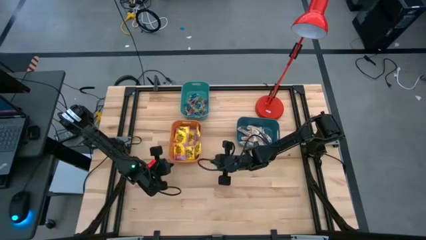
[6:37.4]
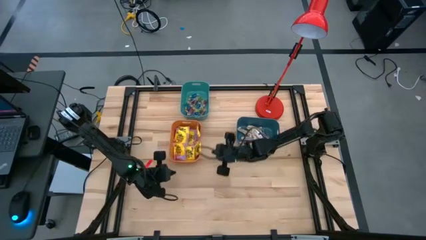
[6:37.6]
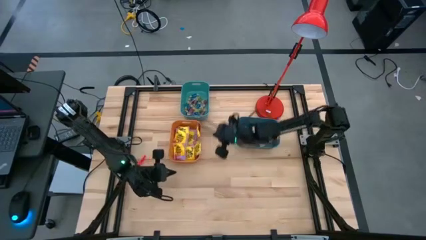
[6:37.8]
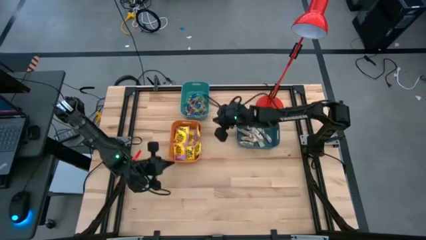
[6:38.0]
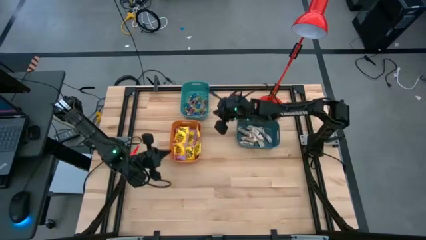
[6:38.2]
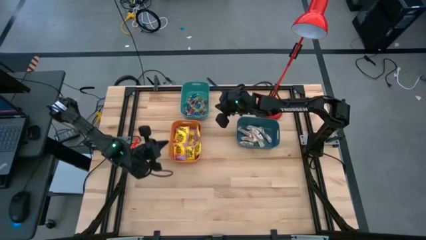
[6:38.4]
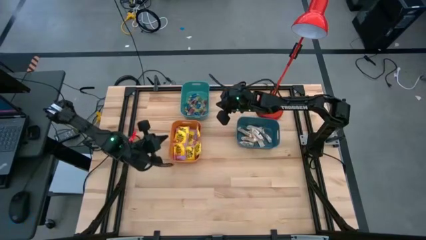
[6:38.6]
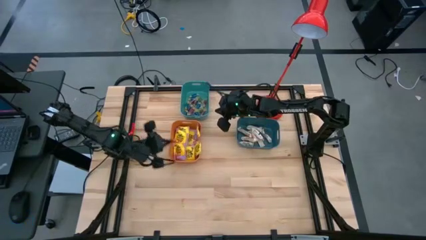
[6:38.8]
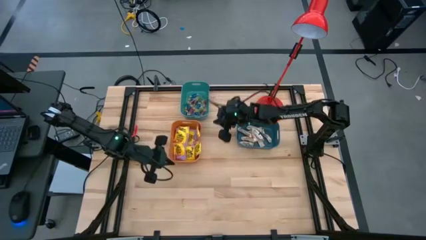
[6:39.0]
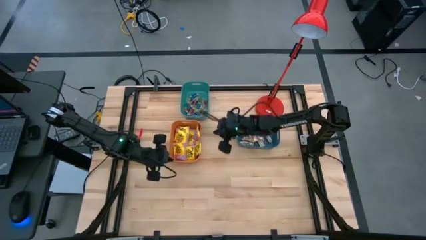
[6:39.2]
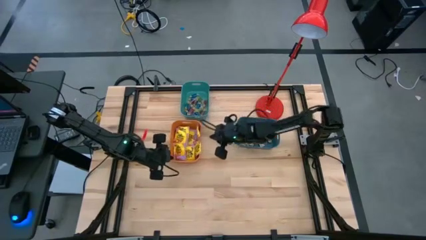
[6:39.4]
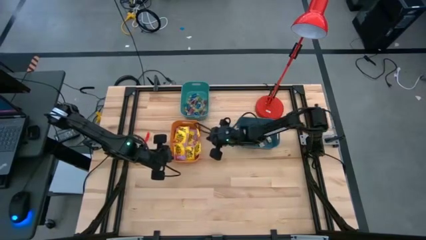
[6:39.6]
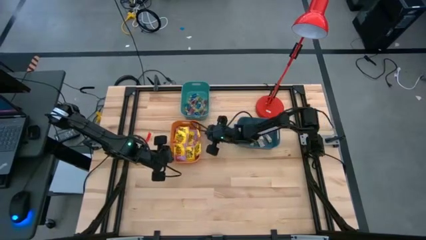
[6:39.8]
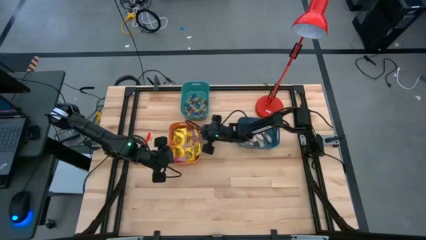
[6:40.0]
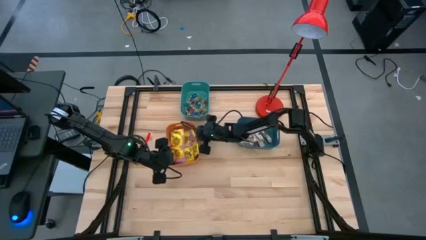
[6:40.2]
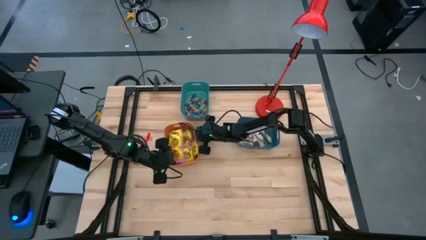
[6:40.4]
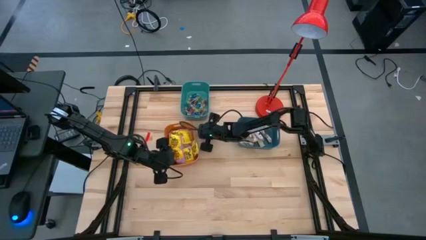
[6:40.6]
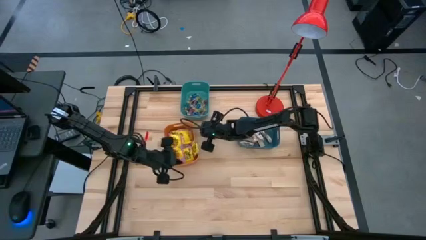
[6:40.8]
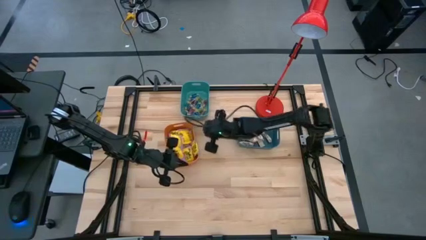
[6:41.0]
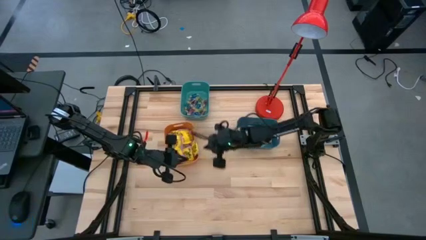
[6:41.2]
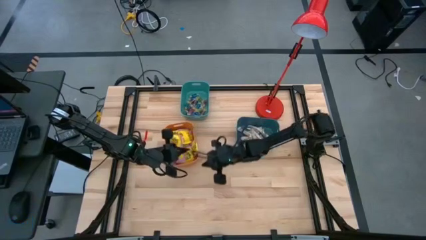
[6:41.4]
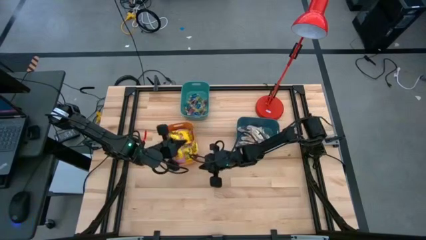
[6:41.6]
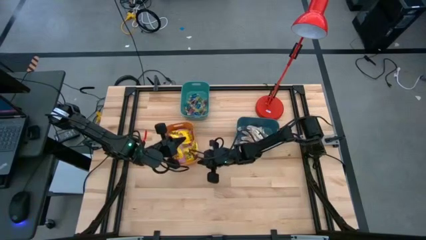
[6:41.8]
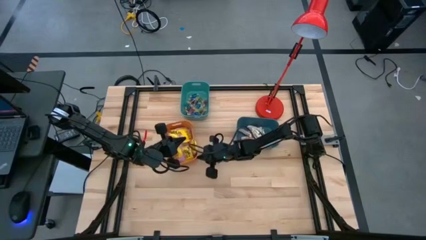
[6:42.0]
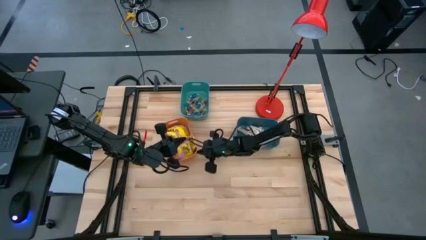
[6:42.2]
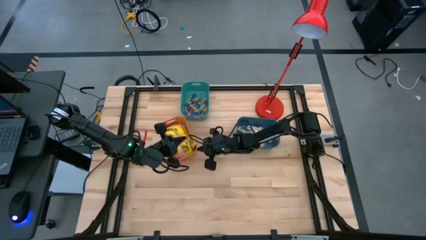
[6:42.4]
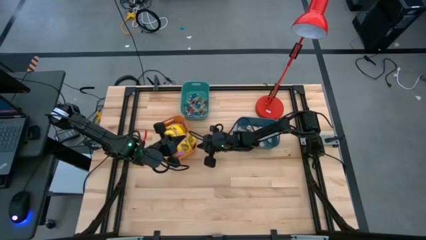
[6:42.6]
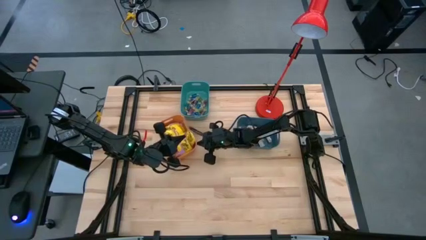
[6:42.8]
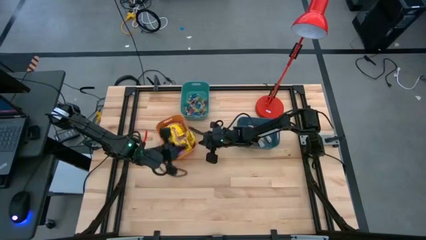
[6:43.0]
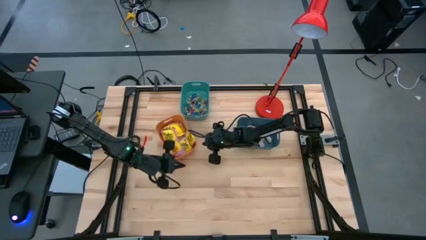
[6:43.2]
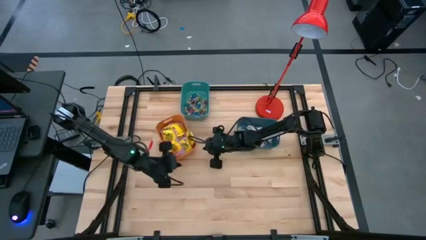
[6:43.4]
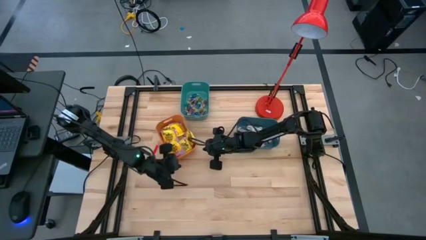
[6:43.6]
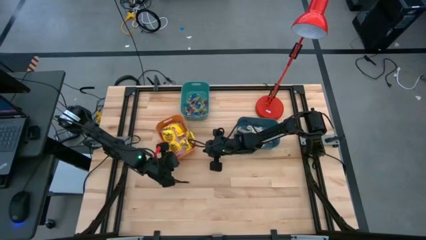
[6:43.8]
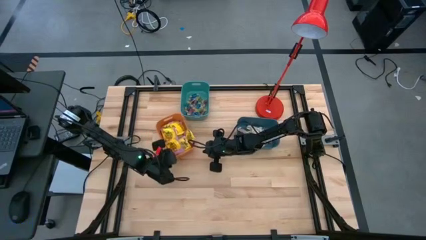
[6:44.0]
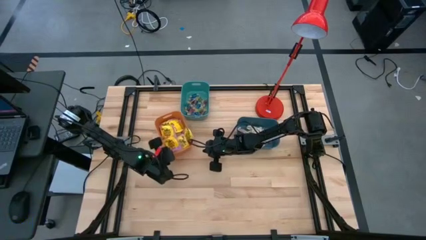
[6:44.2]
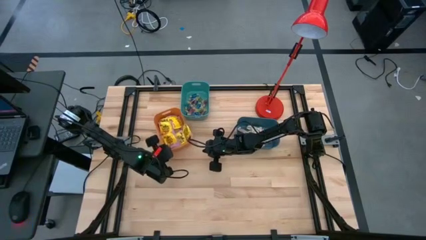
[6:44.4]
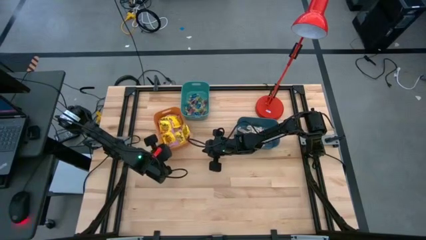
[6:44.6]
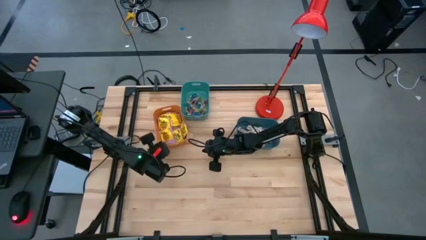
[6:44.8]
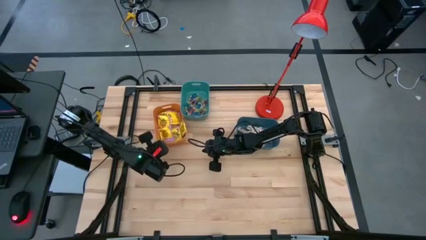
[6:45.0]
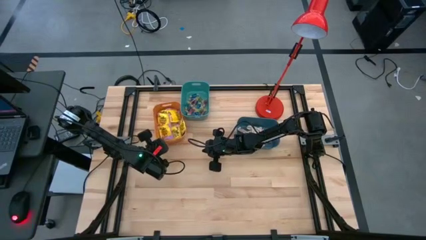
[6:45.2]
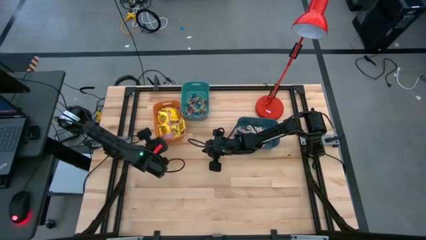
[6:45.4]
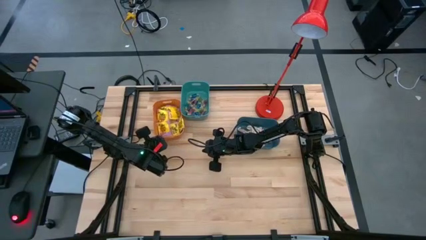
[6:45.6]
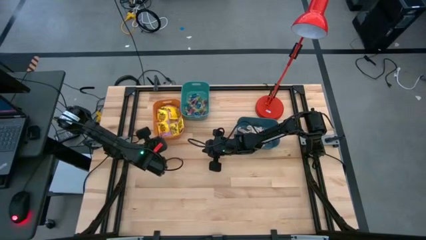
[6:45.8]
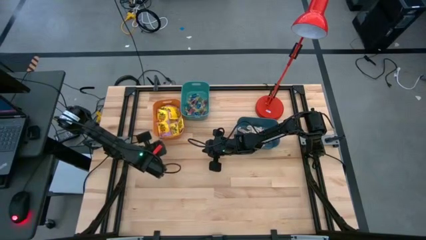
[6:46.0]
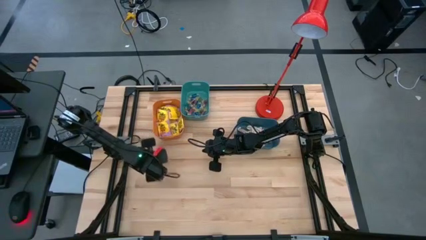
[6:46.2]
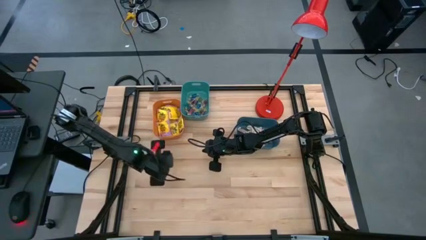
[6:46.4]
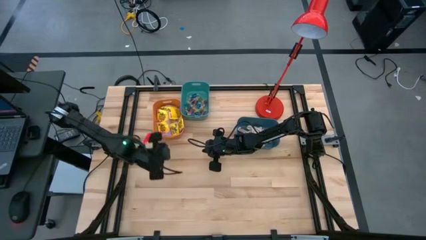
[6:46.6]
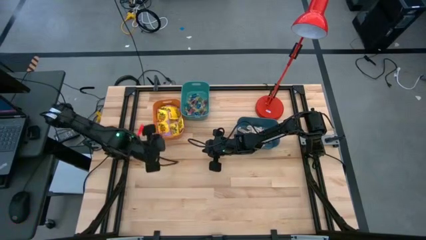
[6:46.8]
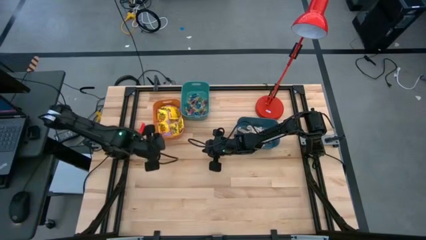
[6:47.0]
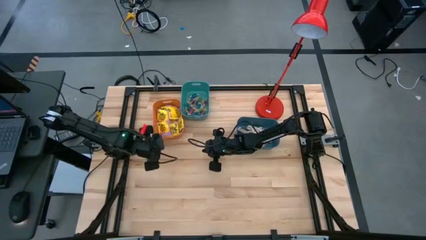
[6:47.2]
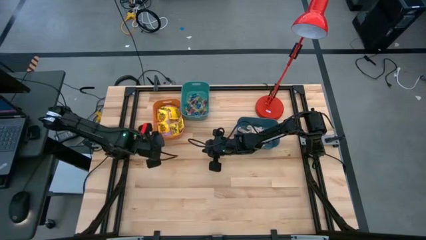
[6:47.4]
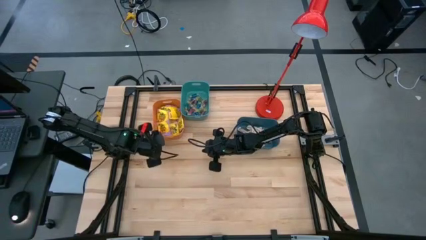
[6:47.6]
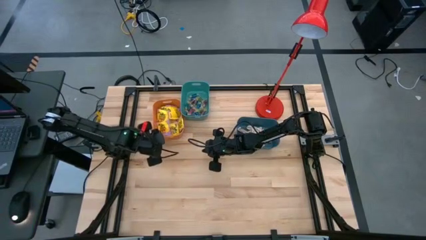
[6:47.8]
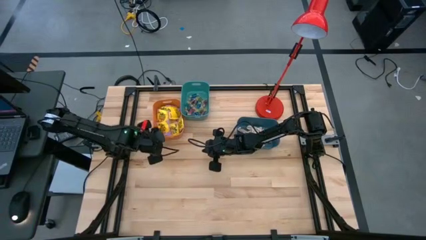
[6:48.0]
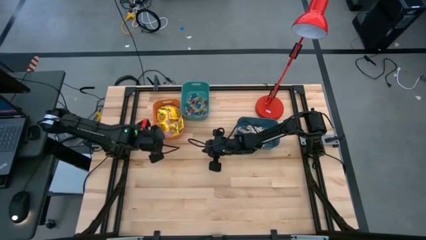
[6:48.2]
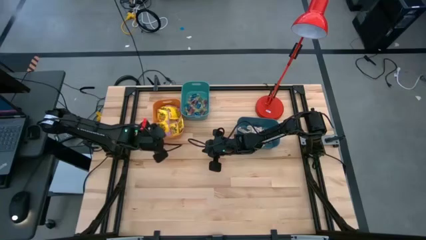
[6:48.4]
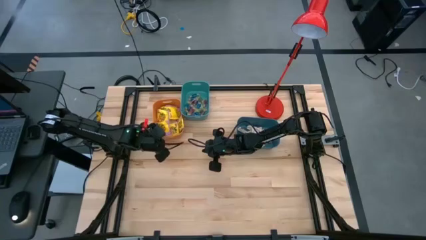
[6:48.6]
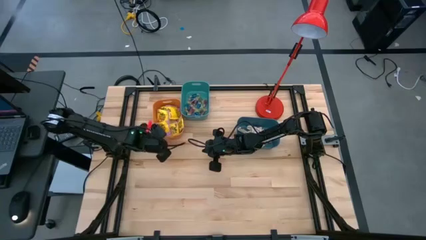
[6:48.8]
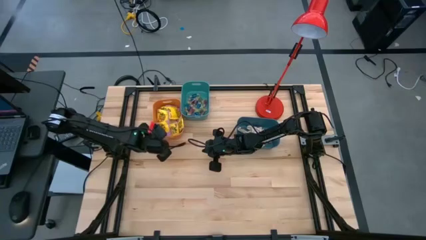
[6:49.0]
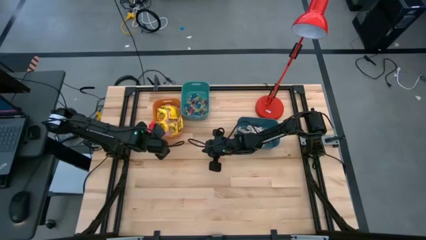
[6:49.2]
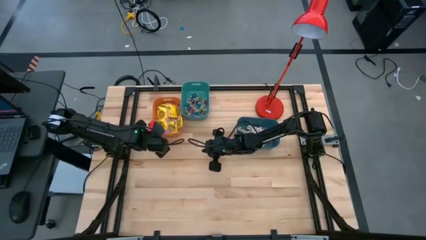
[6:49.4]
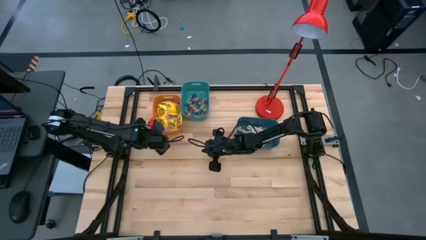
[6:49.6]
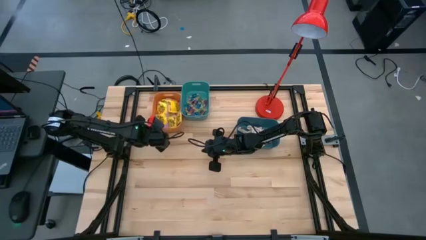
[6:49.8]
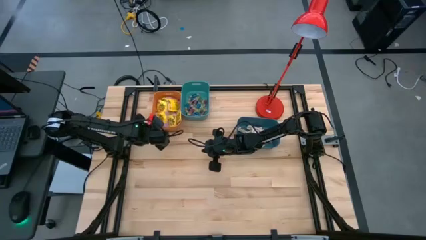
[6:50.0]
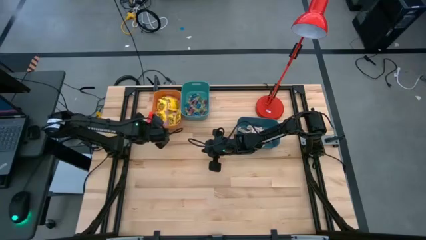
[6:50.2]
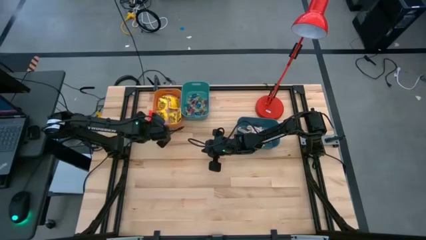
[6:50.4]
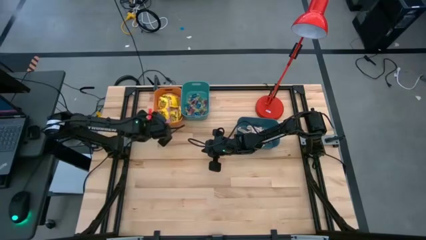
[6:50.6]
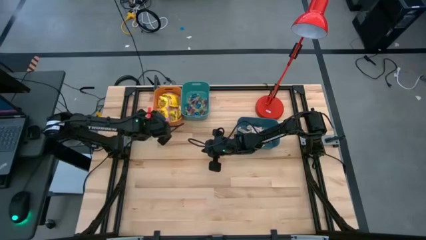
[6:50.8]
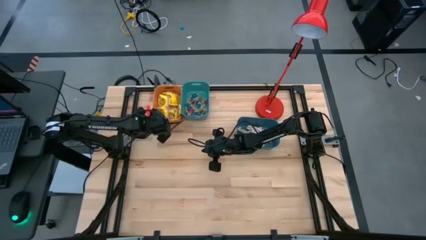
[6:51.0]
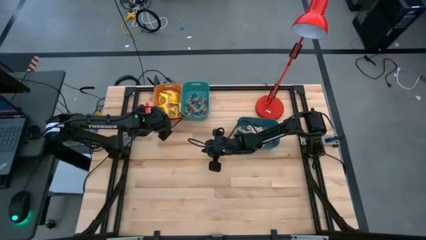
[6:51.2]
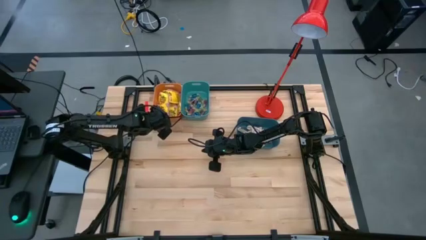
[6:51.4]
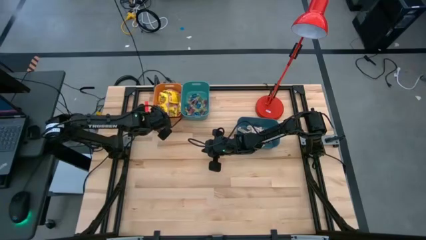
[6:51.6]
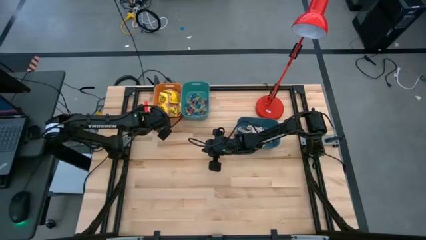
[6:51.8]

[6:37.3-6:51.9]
Task: Sort candy
Move the orange bin to the left side of the green bin
